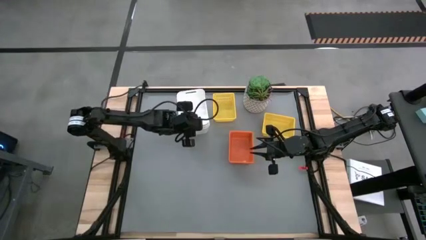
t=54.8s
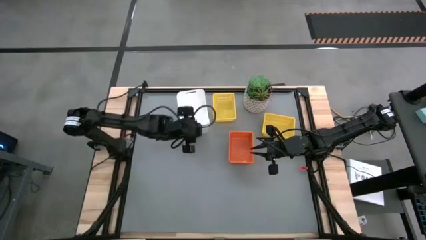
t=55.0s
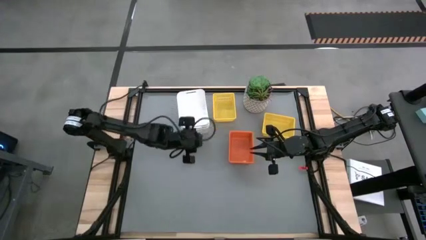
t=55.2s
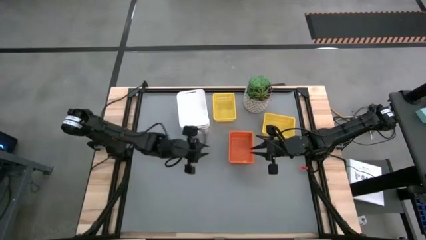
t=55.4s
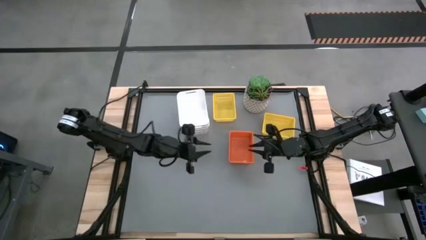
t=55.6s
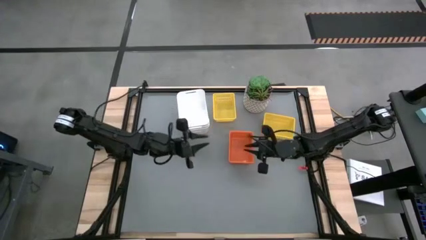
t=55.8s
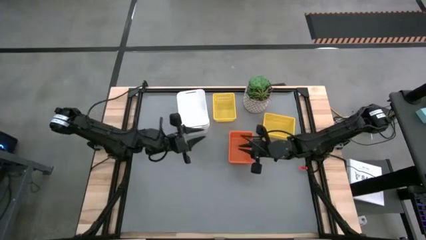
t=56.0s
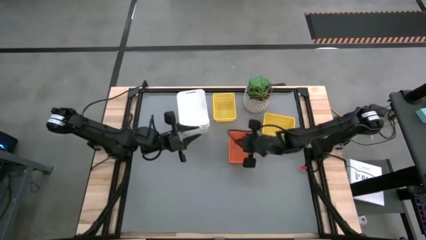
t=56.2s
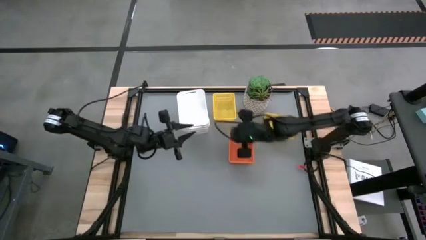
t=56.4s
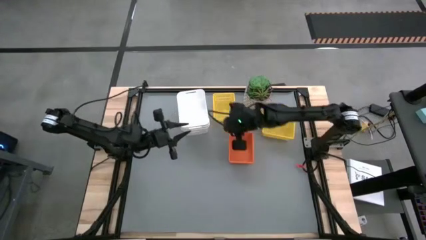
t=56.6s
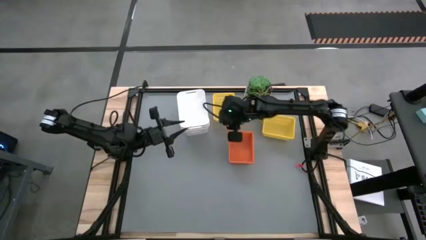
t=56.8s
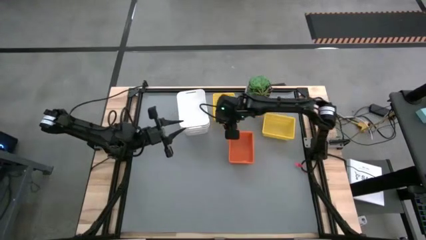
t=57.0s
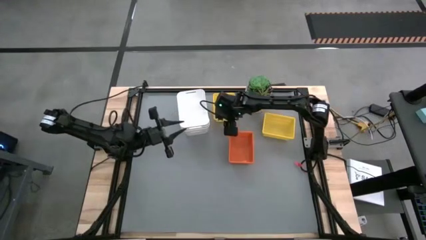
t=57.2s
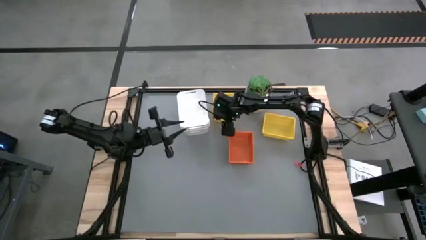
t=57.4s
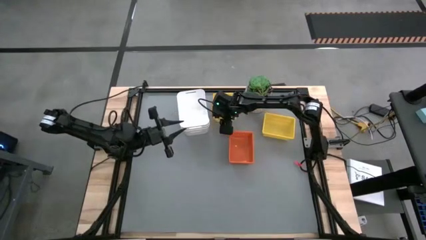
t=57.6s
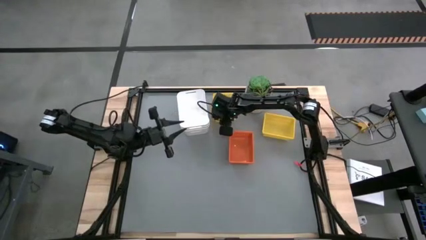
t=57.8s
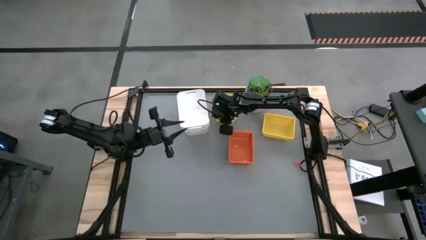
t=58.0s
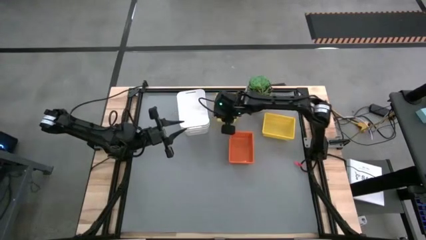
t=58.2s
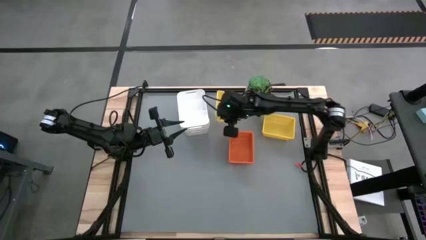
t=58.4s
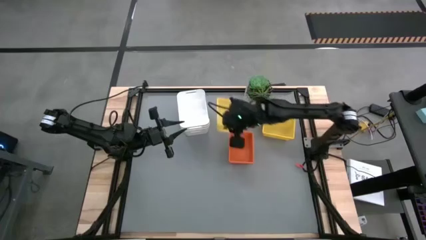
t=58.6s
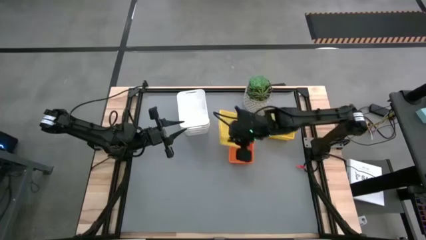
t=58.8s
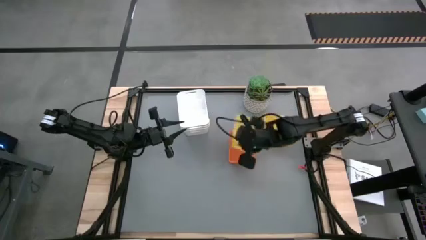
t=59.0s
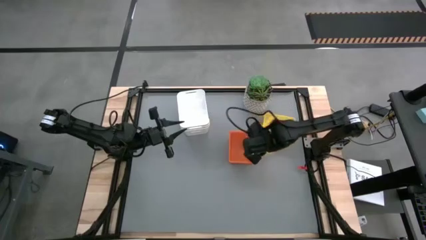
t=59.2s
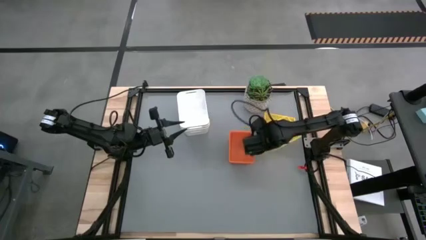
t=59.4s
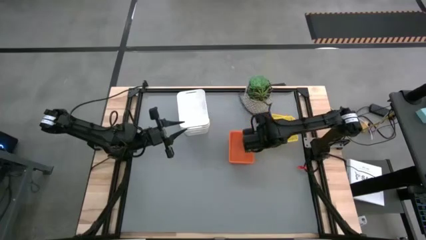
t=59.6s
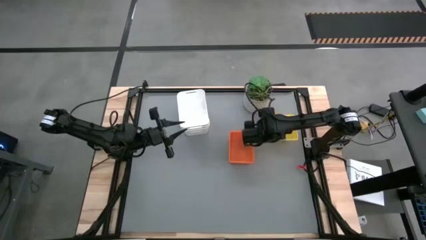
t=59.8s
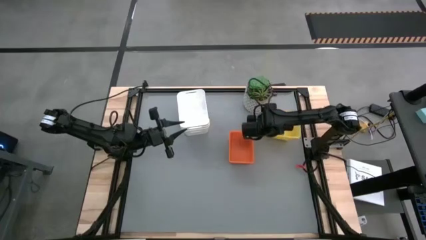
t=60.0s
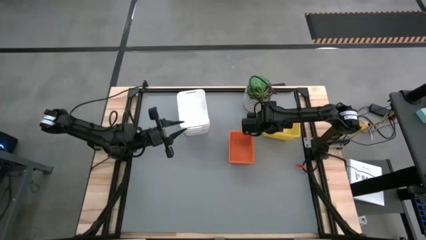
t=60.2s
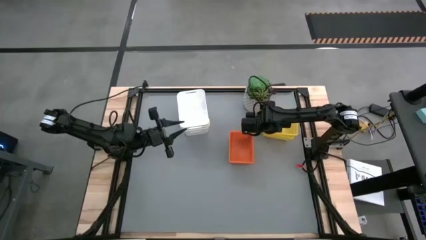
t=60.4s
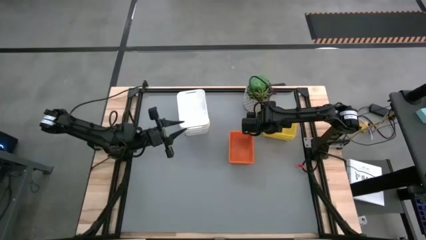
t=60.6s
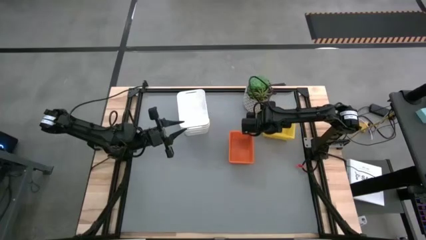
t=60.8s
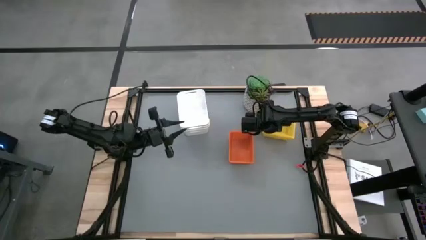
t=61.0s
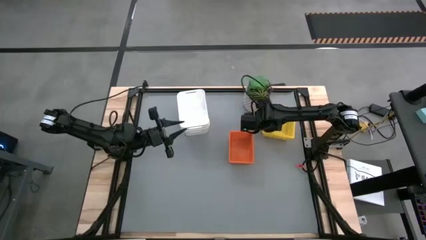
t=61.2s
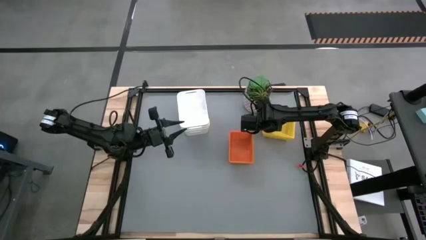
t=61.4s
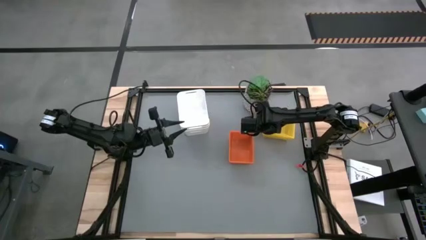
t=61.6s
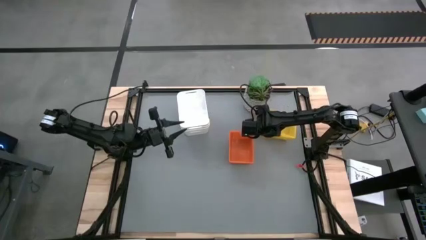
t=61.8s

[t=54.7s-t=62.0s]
Stack the left yellow bin on top of the right yellow bin

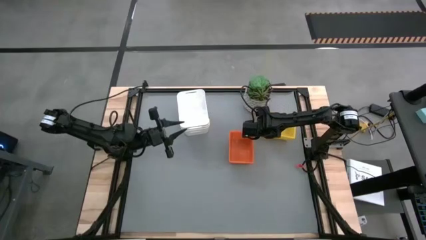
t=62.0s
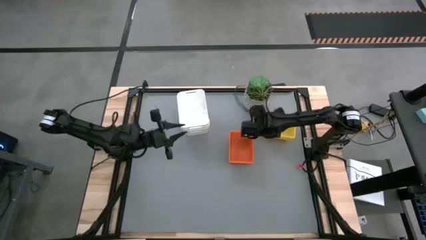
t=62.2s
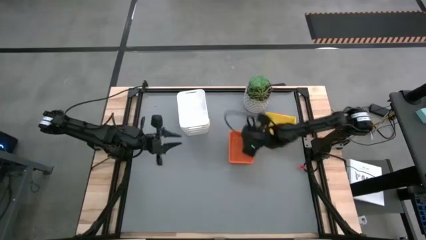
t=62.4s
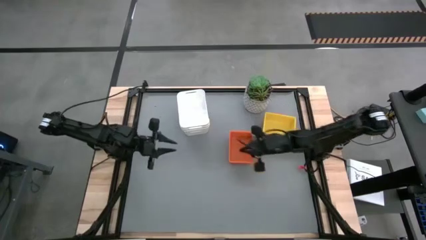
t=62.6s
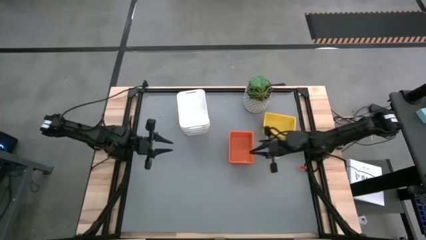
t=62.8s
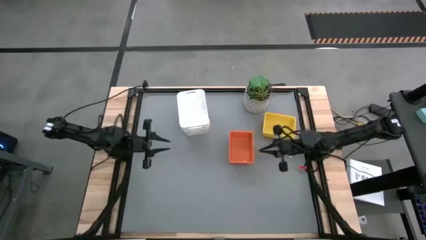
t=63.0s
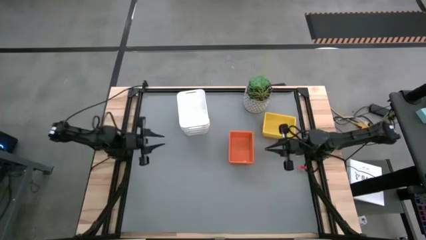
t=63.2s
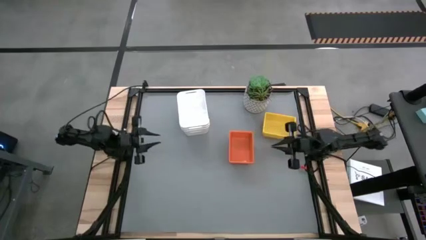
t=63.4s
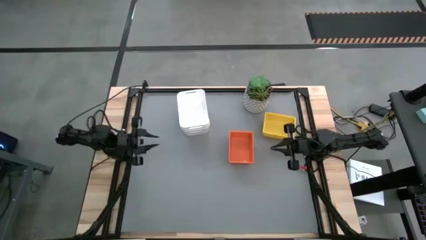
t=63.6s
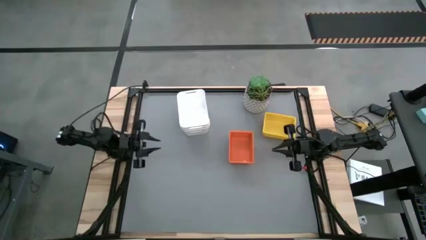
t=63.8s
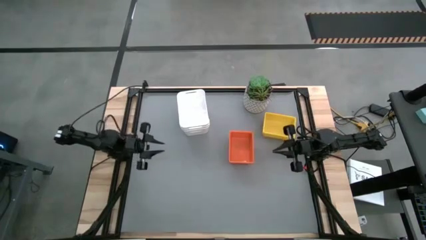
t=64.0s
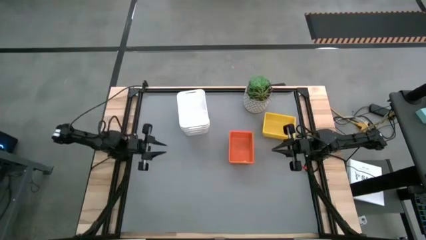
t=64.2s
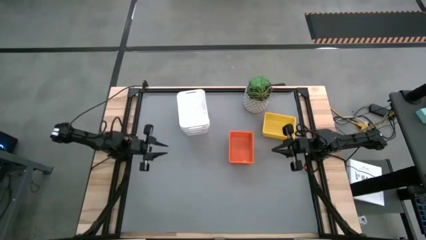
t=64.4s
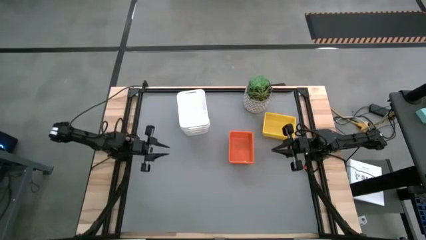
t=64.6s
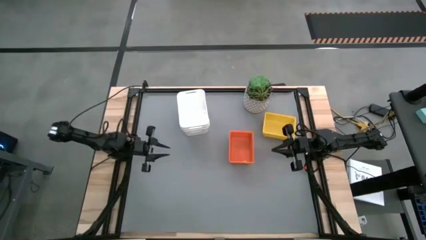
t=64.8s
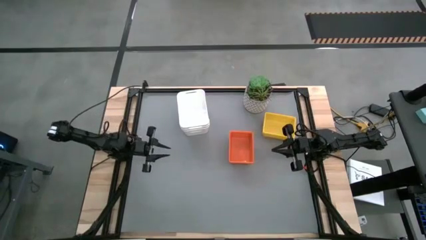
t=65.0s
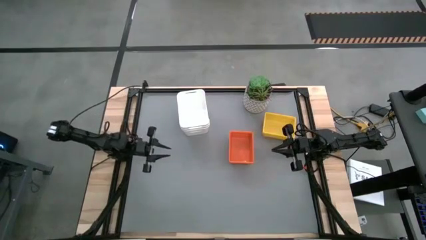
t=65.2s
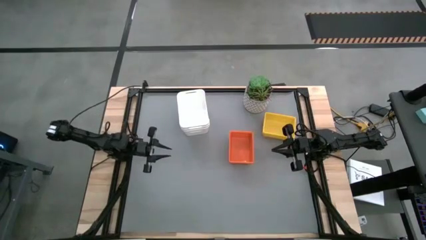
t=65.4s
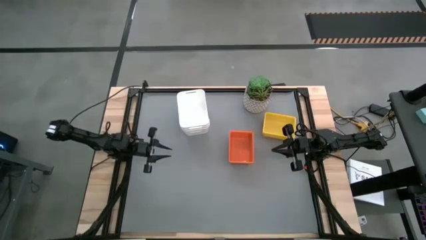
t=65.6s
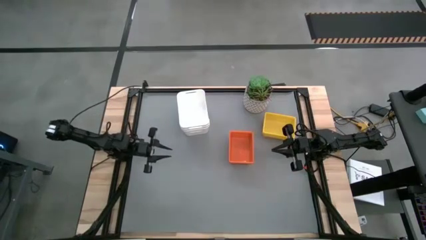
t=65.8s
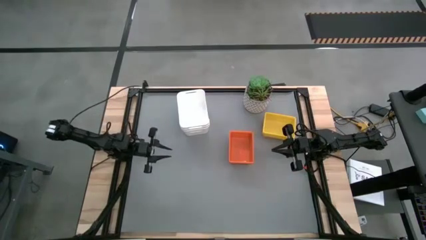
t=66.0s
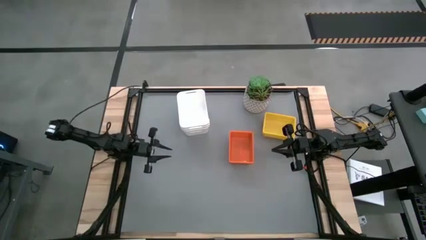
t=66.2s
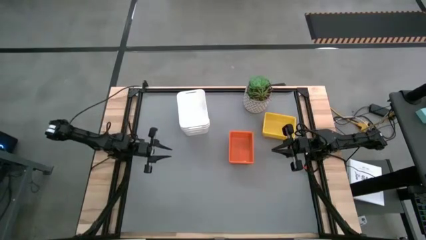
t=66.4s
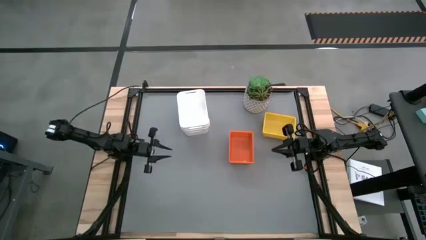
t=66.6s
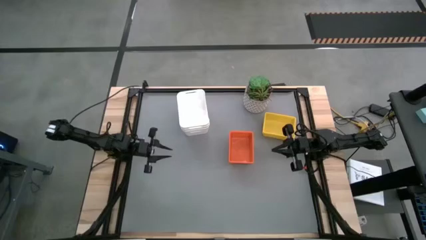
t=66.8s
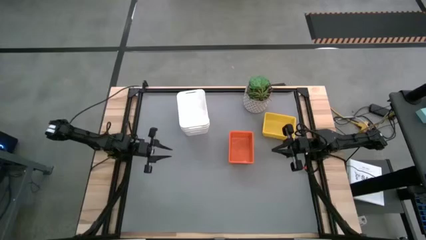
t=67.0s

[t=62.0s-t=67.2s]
Return to Home Position

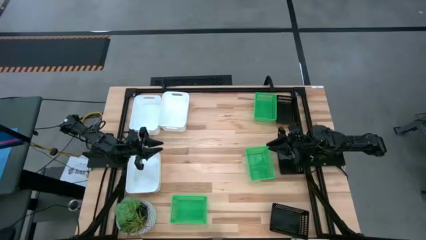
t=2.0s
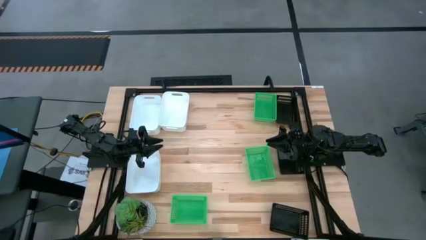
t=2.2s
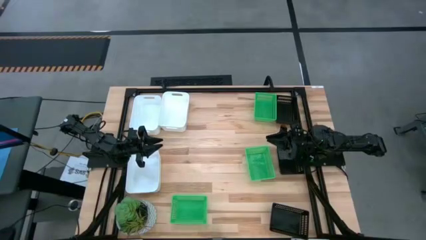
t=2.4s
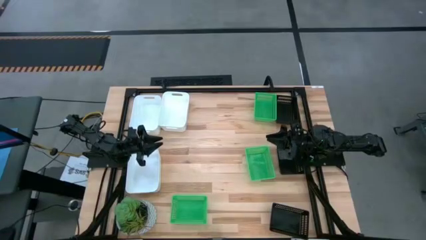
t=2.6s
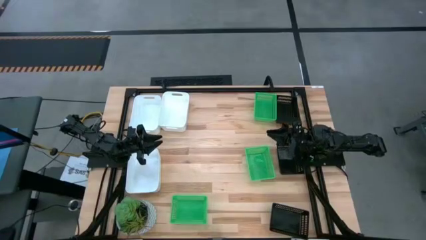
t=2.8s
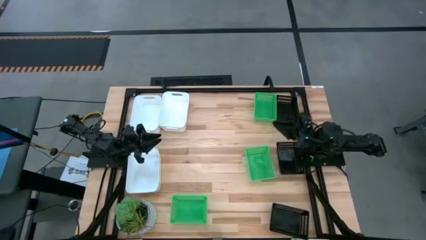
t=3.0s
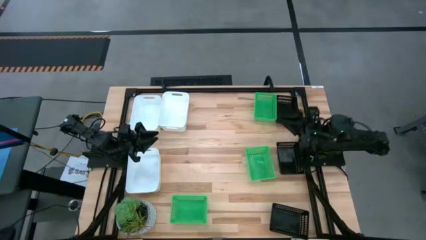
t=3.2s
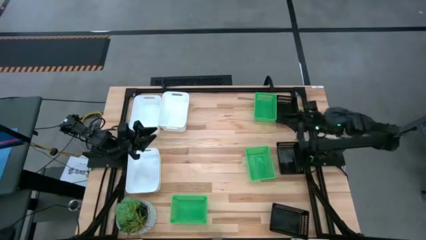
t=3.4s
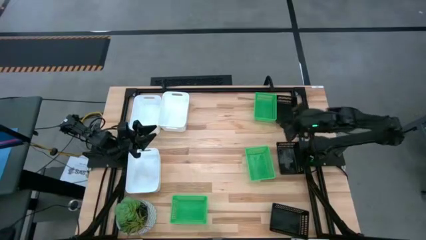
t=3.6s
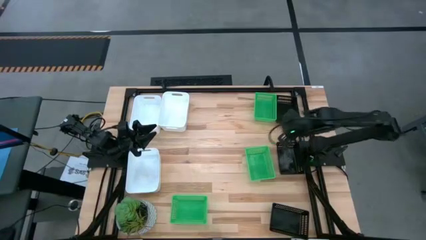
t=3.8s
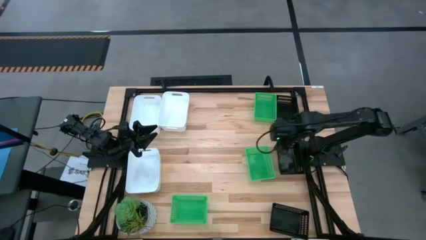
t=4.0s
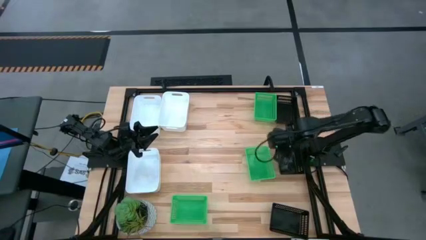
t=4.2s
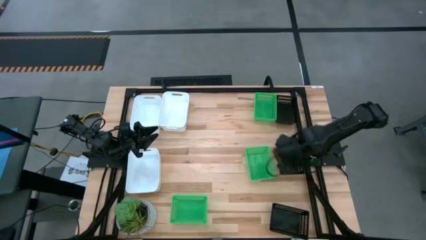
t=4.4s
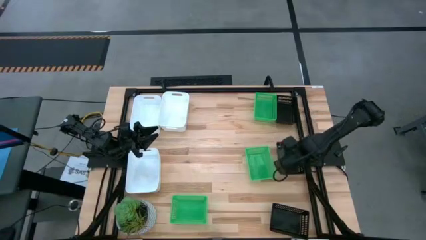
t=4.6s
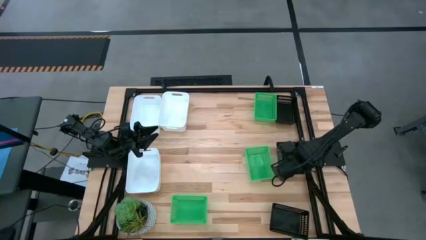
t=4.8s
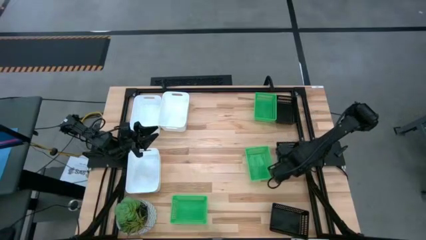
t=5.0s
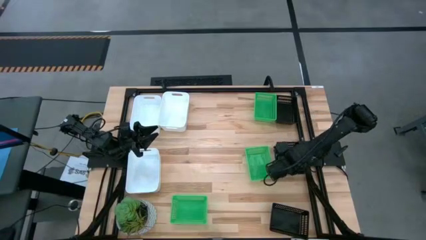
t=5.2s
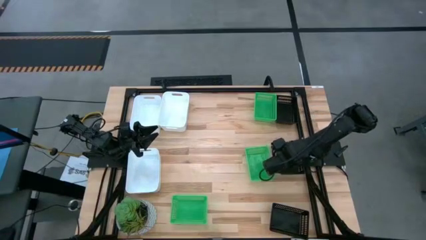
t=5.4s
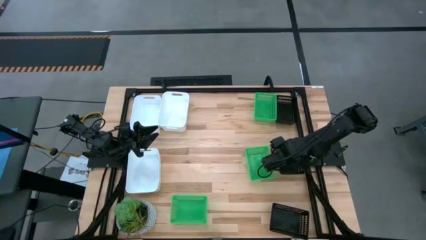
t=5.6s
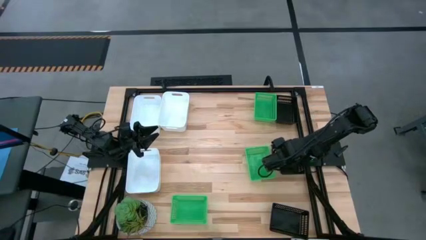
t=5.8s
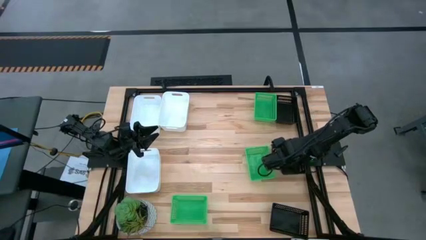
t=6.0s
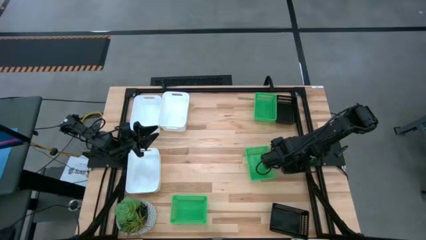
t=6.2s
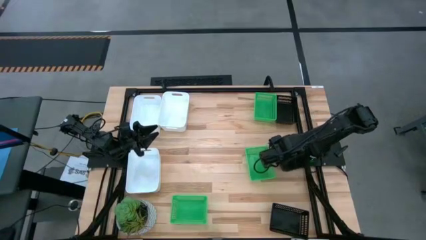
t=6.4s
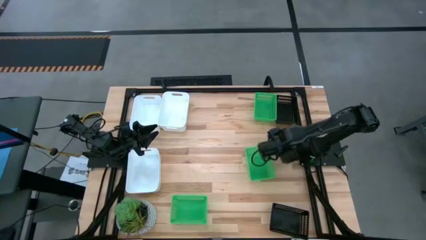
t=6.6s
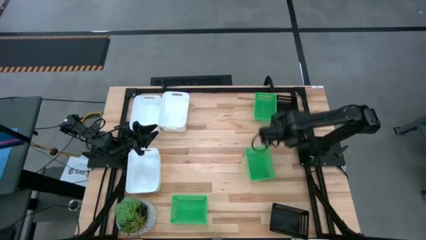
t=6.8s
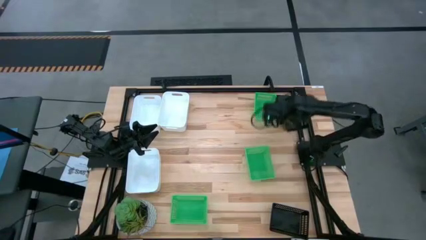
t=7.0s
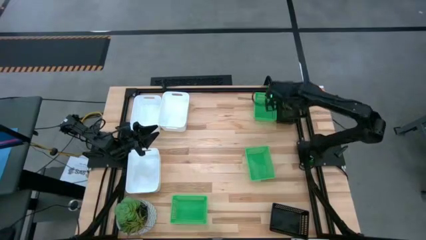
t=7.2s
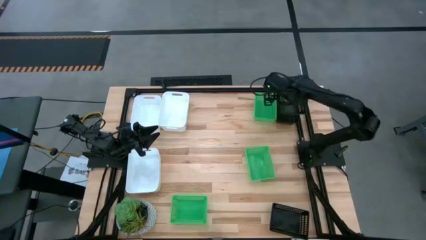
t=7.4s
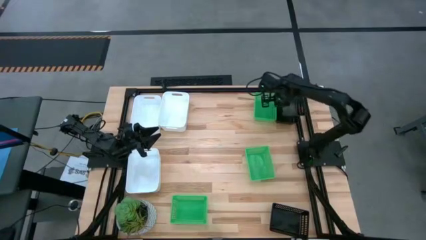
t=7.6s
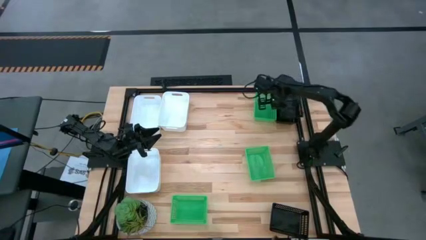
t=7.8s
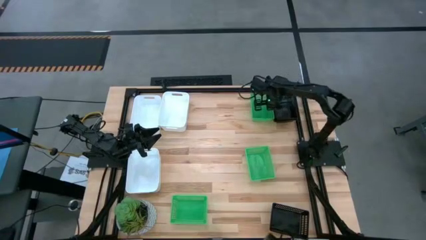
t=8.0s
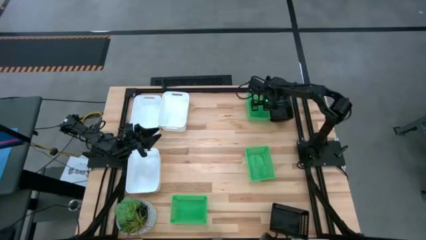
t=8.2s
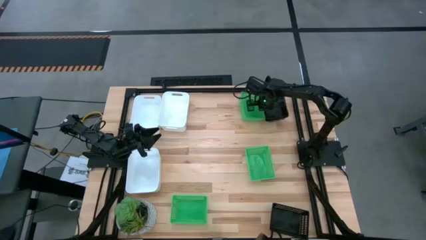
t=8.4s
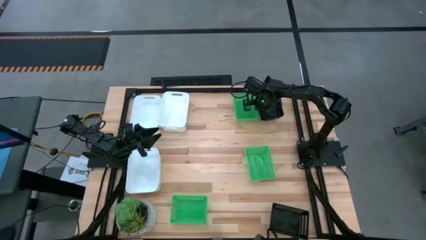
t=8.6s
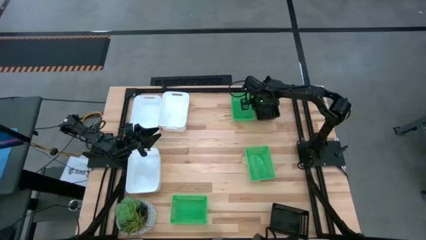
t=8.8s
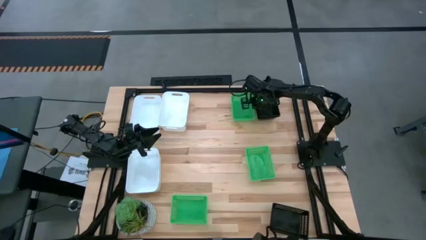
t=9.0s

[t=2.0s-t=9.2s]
Stack the middle black bin into the top black bin
